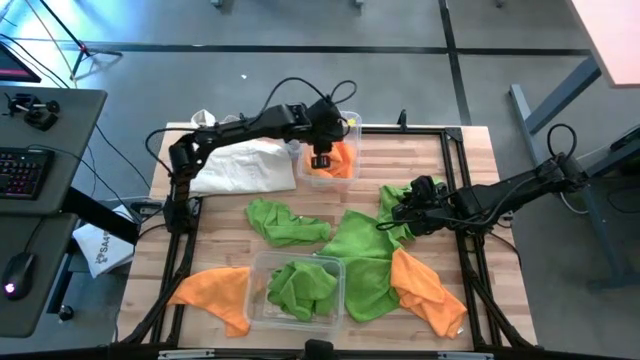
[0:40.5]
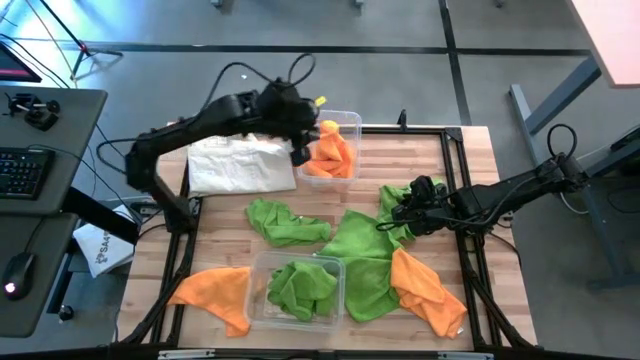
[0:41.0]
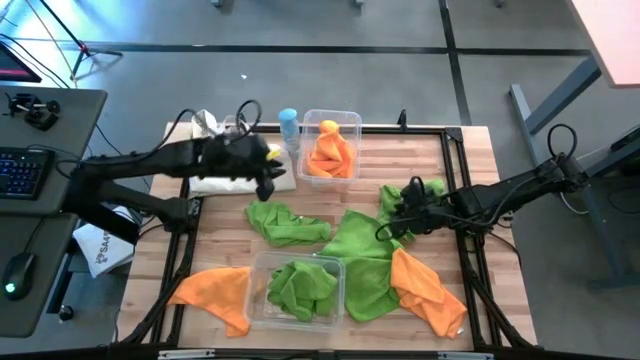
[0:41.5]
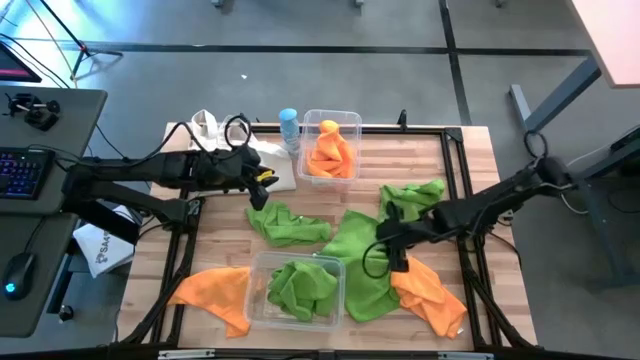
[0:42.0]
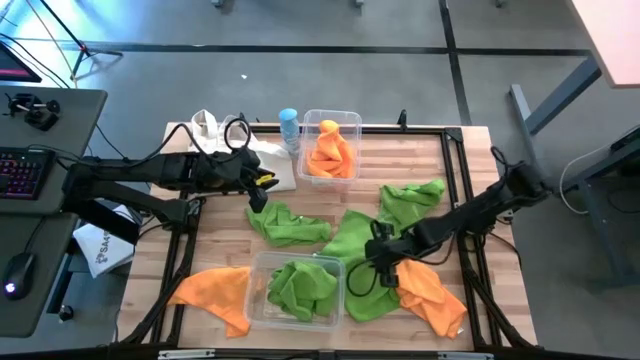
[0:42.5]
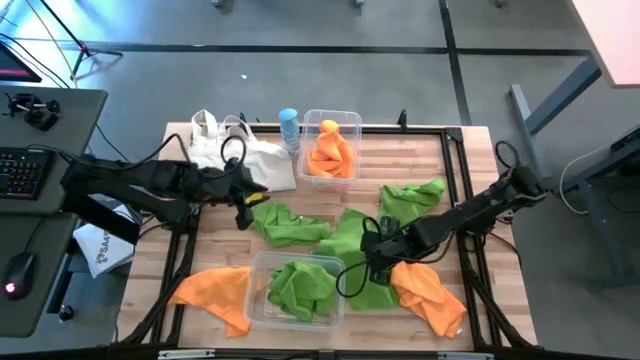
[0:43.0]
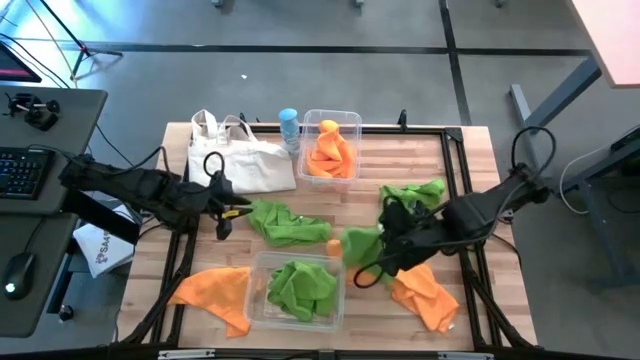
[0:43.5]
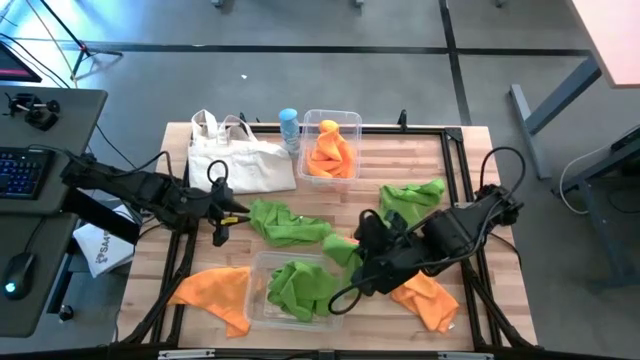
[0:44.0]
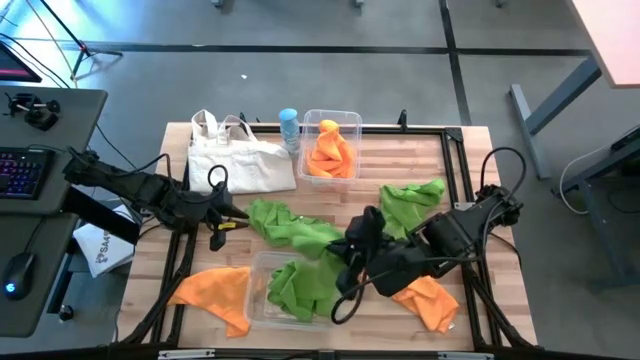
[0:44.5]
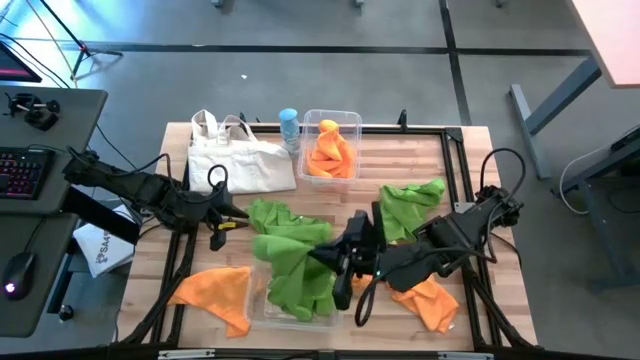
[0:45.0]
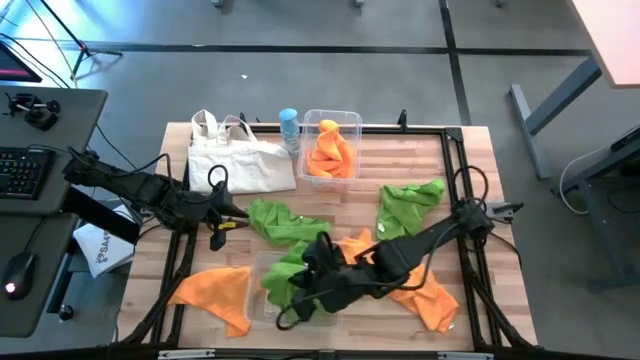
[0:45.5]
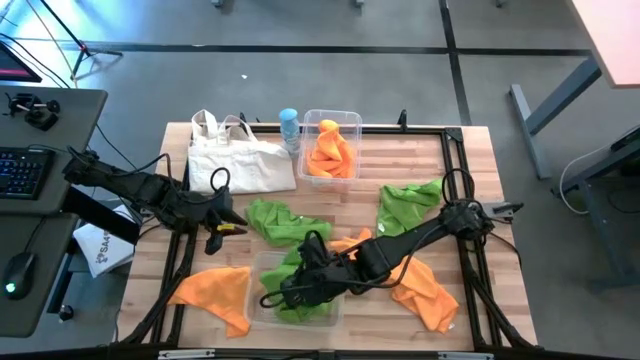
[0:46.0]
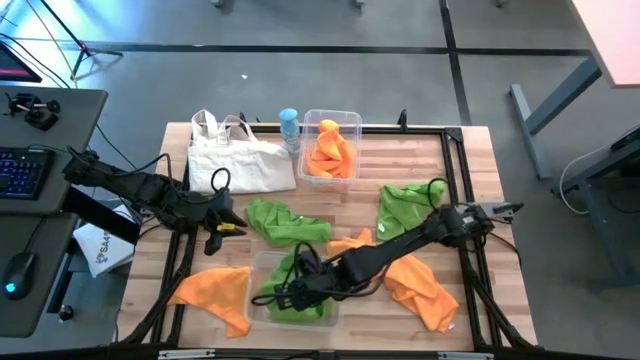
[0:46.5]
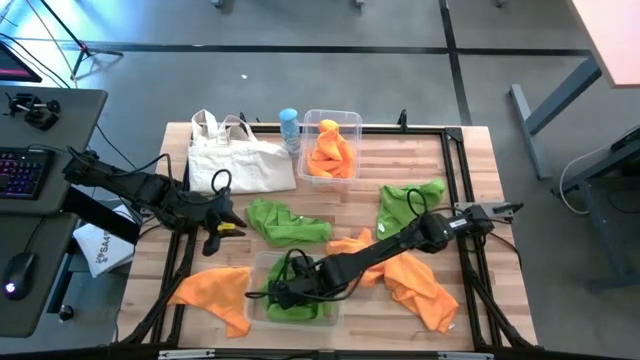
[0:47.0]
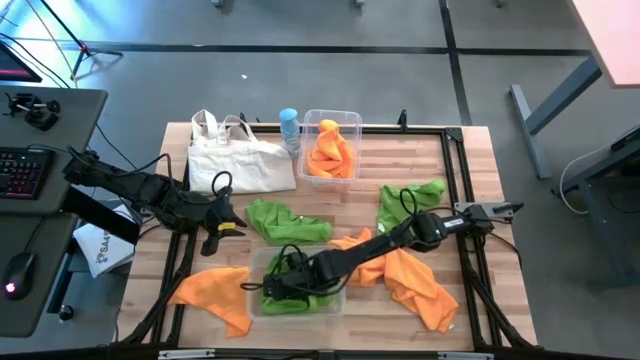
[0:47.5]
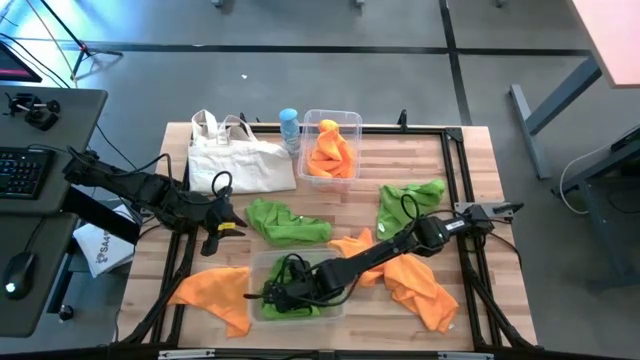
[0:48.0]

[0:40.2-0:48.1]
Task: Sort microfiber towel by color & place in baskets
Put the green microfiber cloth towel into the bottom transparent bin

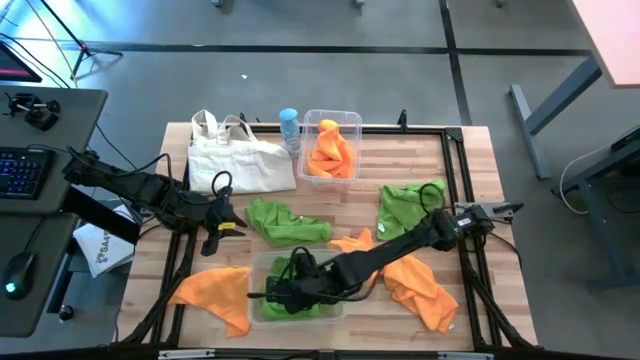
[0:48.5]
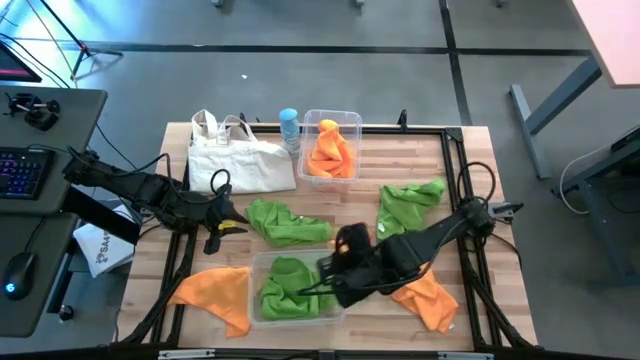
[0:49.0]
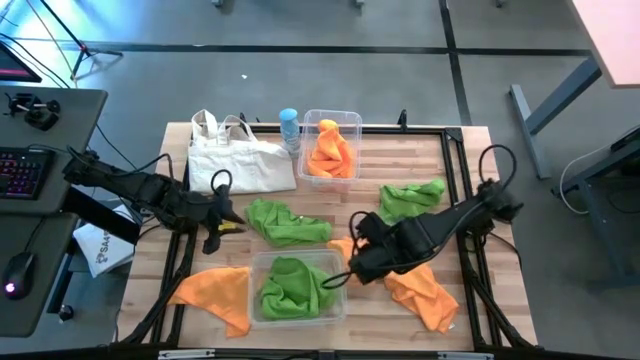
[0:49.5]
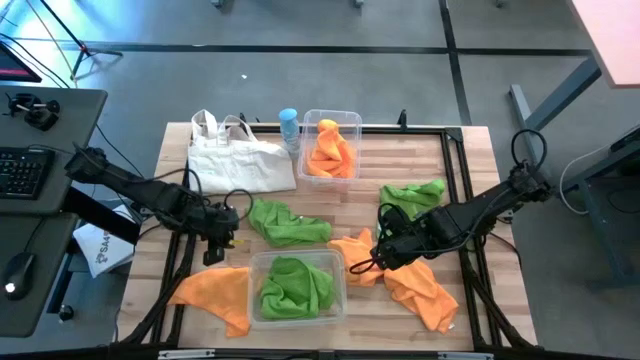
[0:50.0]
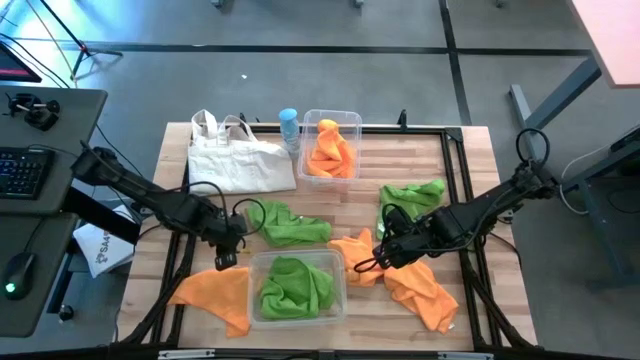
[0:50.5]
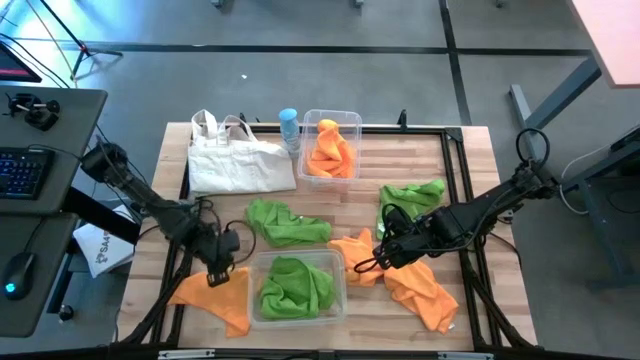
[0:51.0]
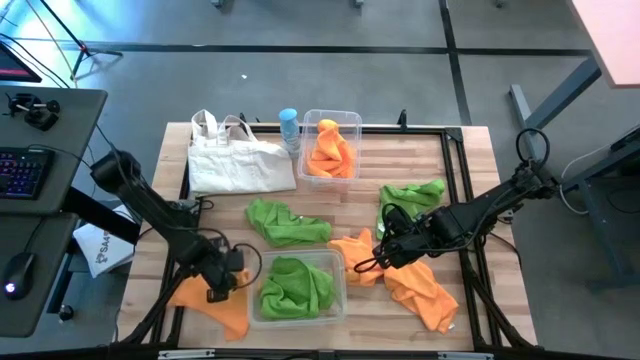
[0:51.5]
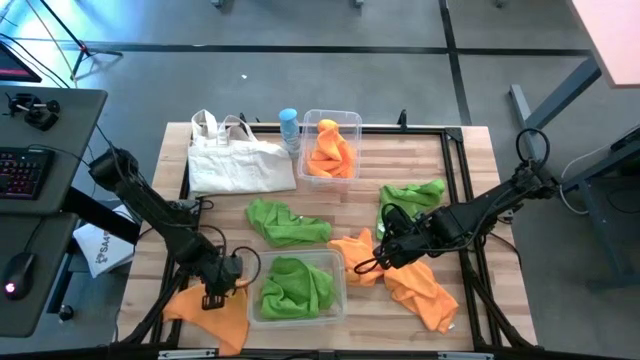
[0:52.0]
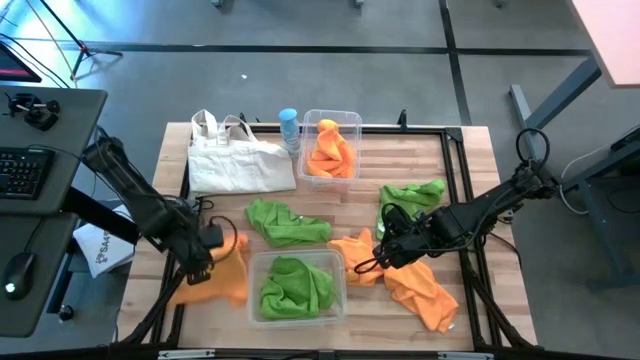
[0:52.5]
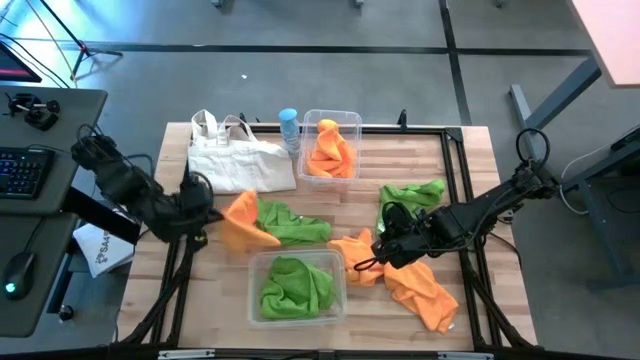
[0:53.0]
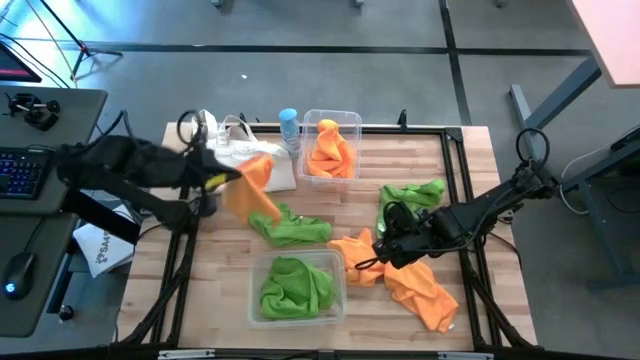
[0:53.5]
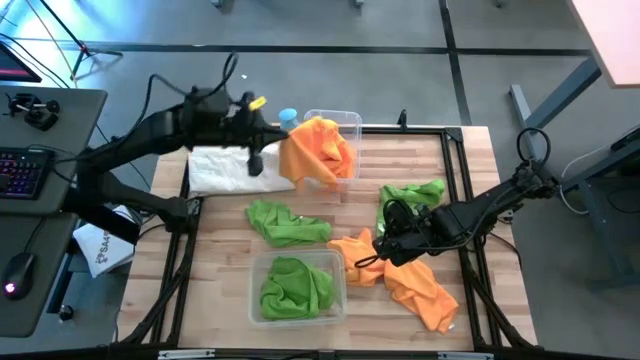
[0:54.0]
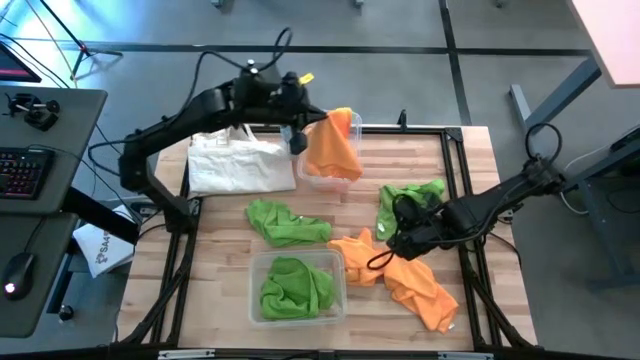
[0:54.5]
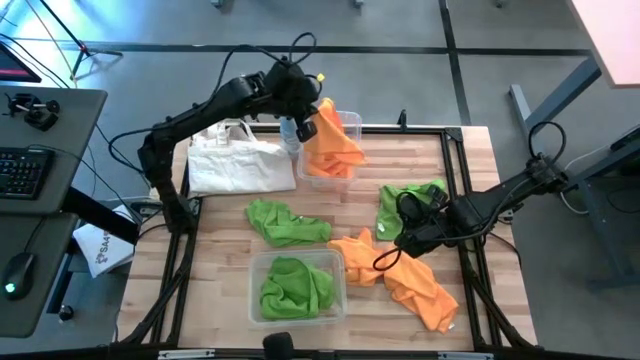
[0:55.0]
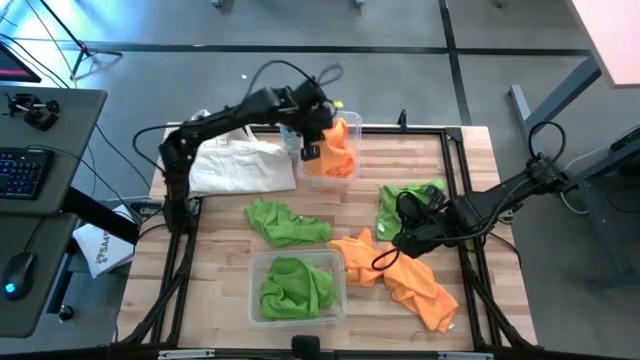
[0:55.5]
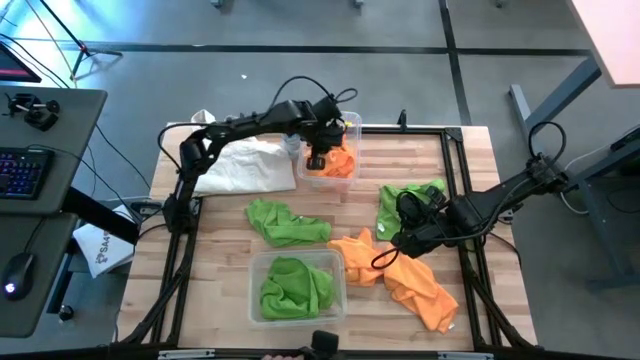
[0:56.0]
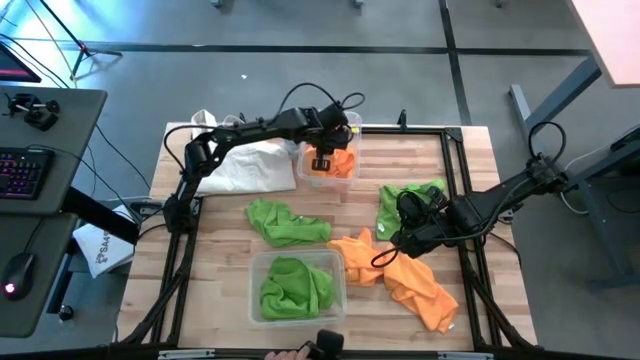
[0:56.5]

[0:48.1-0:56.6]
Put the orange microfiber cloth into the top transparent bin

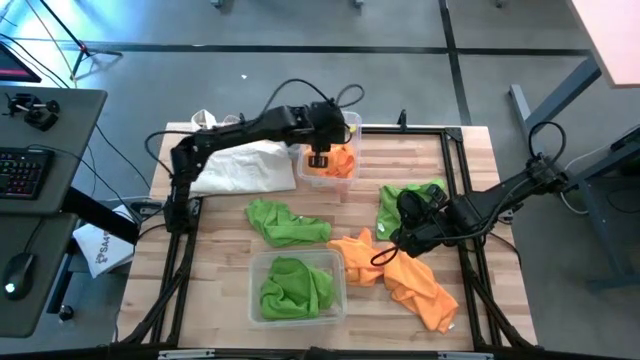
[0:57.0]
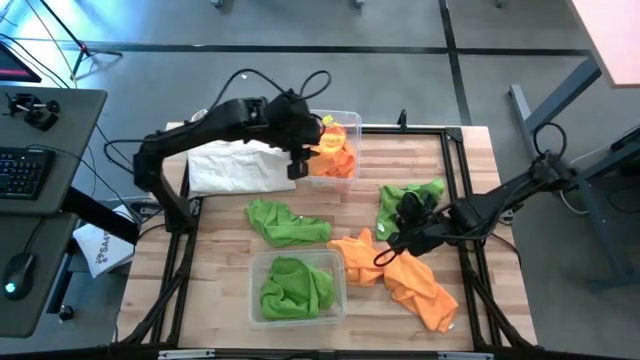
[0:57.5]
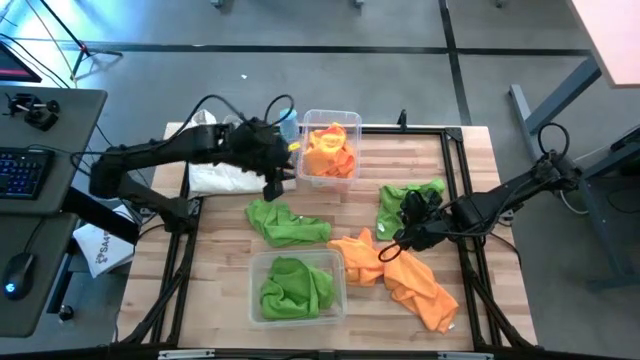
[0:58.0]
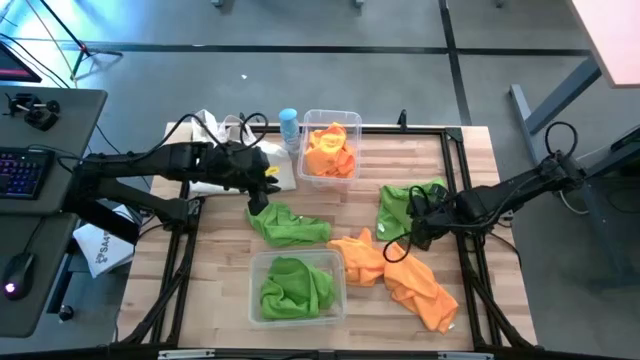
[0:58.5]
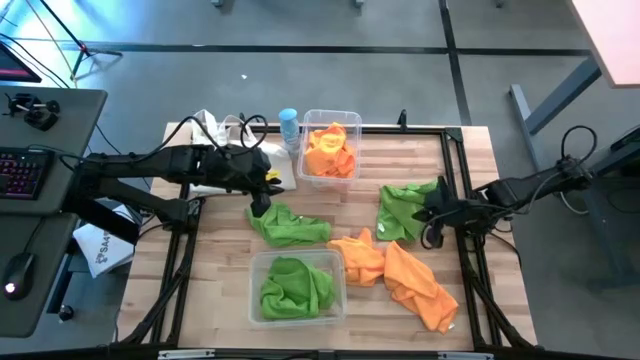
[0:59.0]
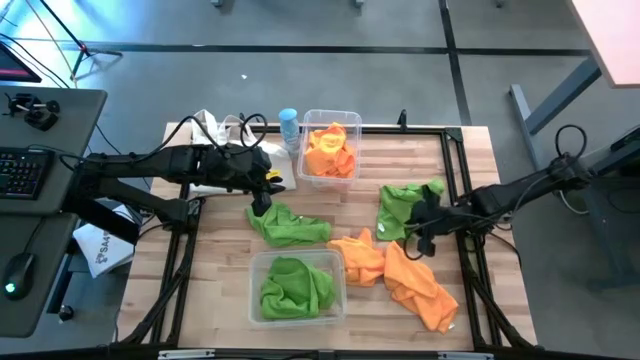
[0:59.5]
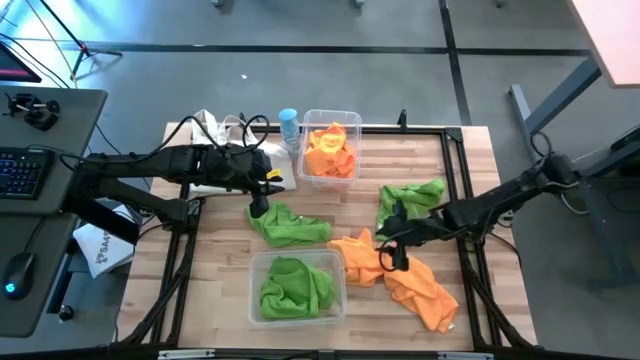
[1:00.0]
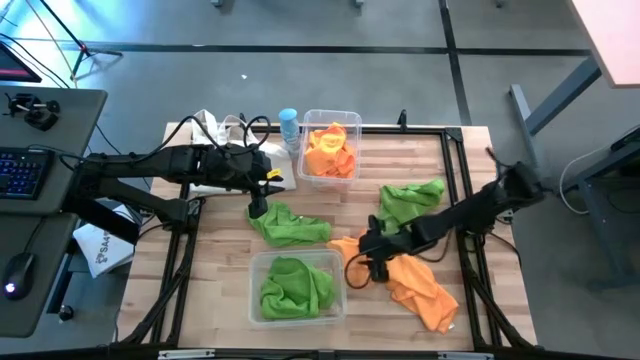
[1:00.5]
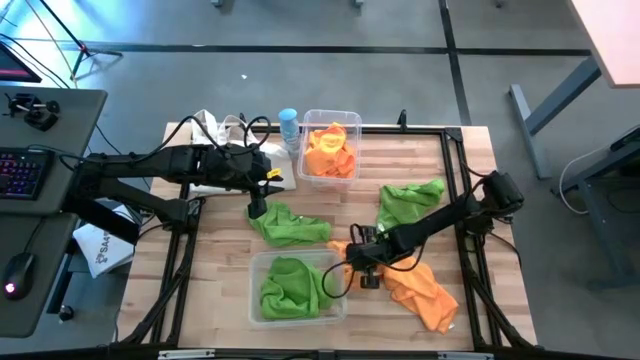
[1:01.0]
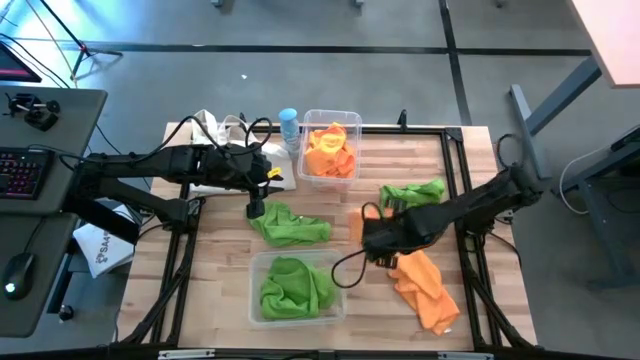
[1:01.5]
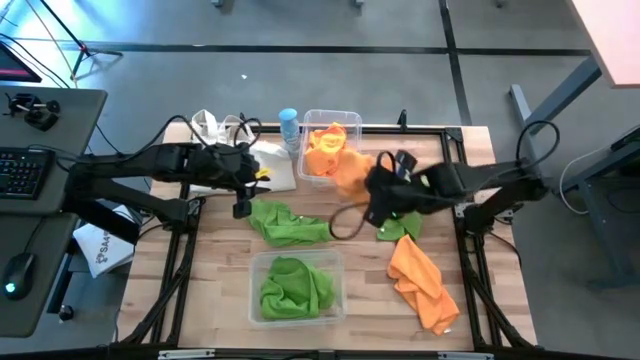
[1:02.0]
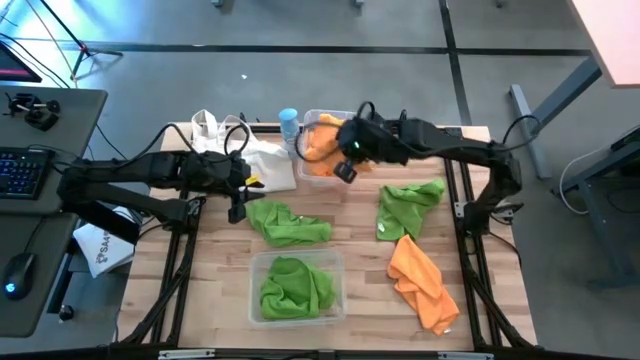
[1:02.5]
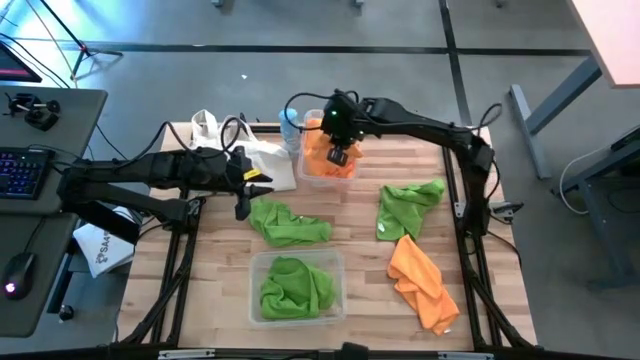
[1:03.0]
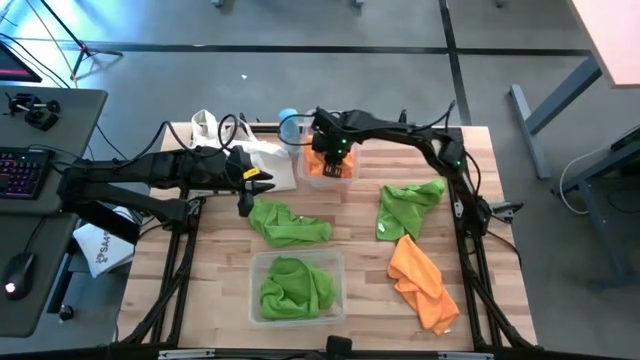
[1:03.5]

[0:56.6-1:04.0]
Put the orange microfiber cloth into the top transparent bin
